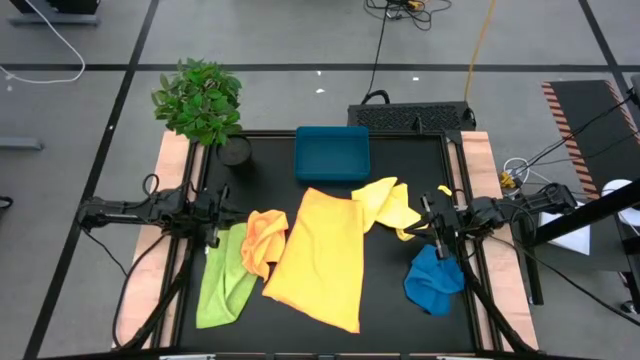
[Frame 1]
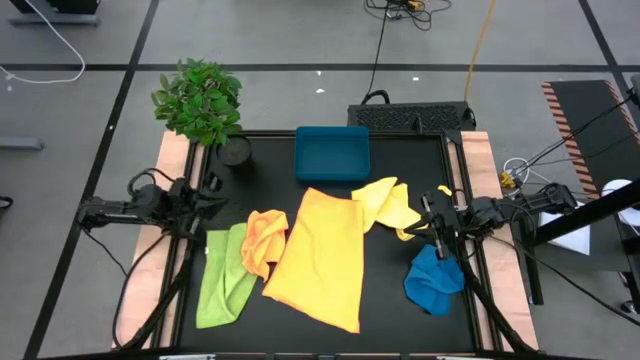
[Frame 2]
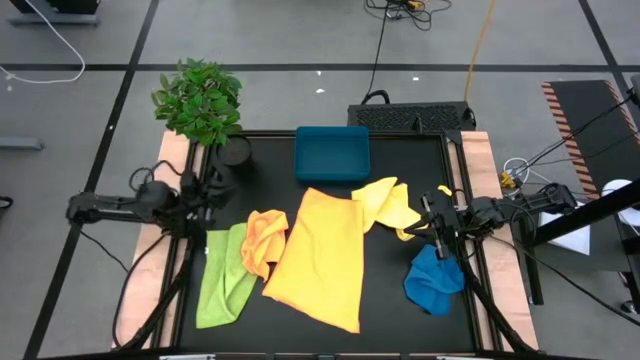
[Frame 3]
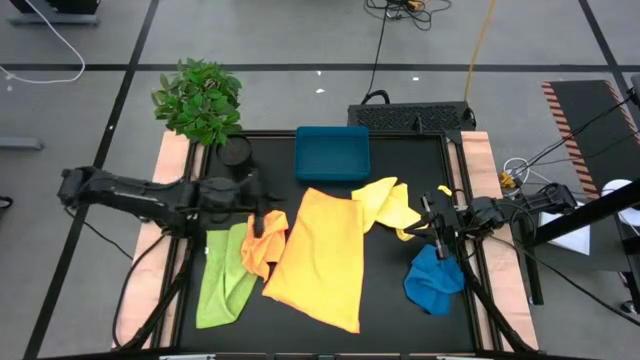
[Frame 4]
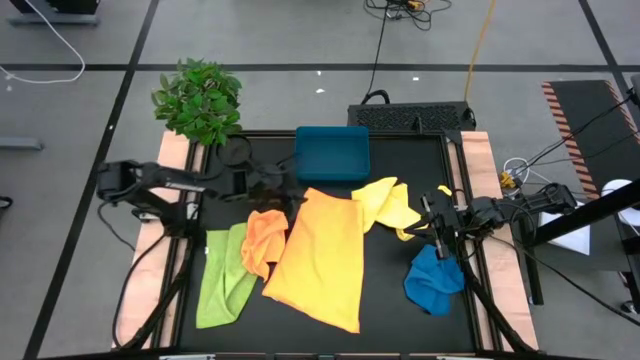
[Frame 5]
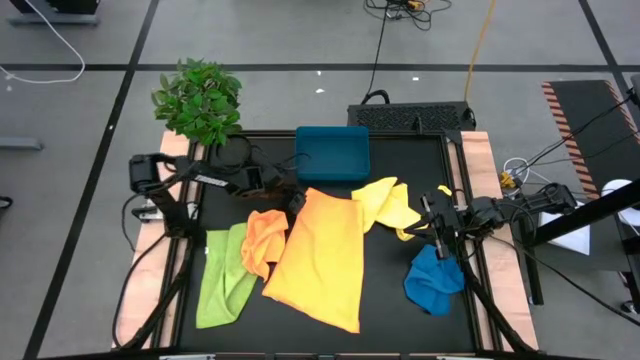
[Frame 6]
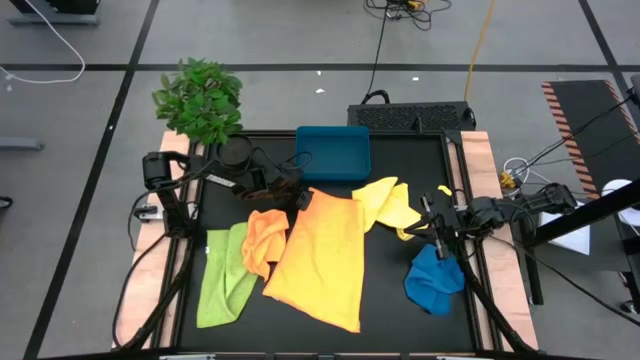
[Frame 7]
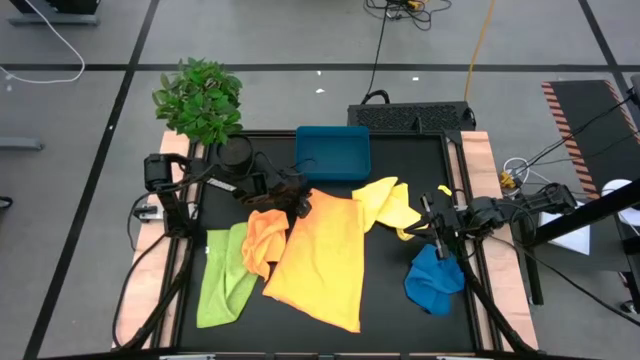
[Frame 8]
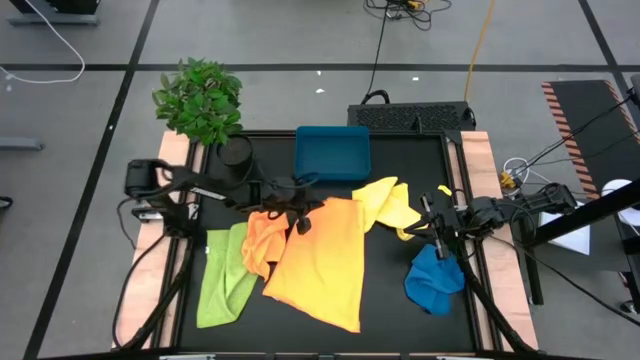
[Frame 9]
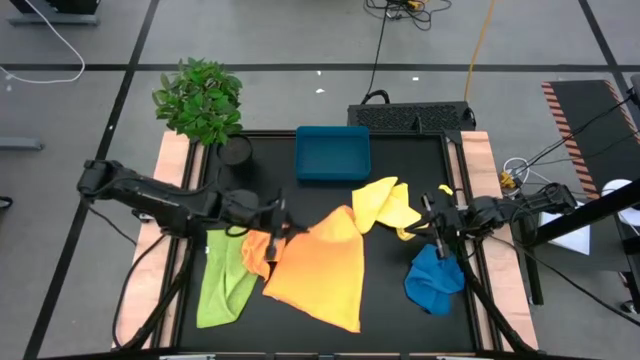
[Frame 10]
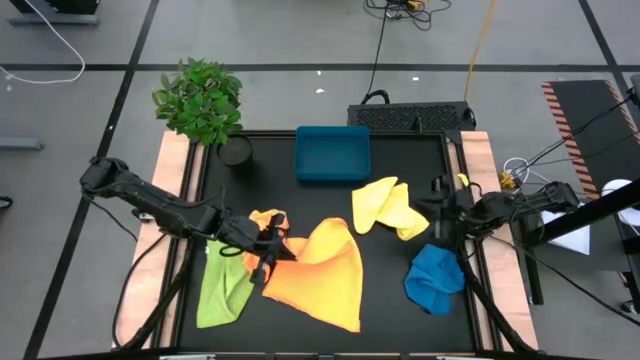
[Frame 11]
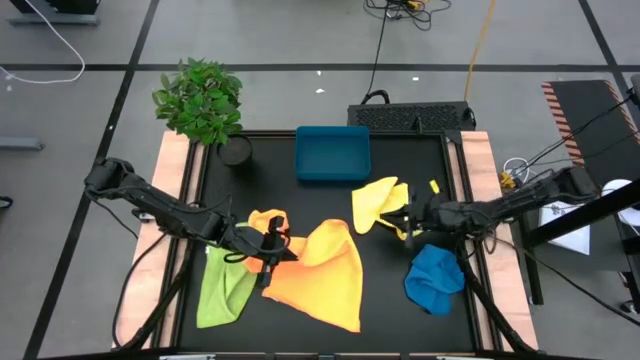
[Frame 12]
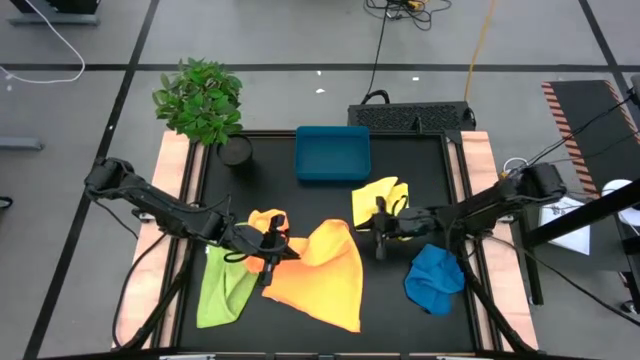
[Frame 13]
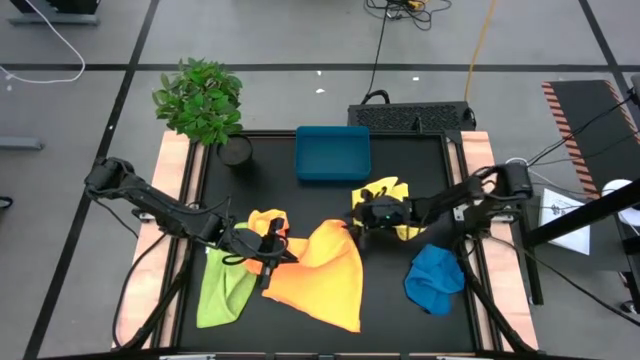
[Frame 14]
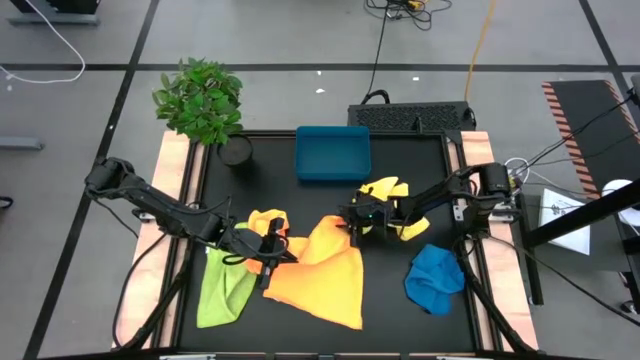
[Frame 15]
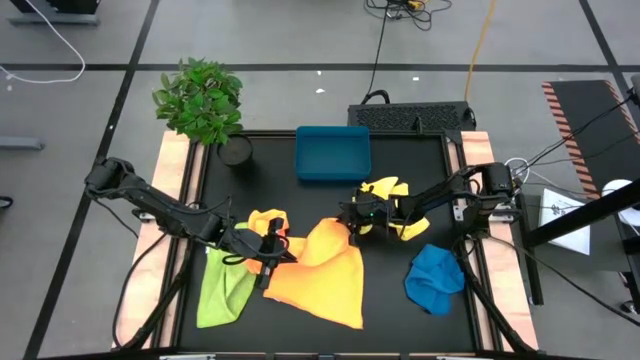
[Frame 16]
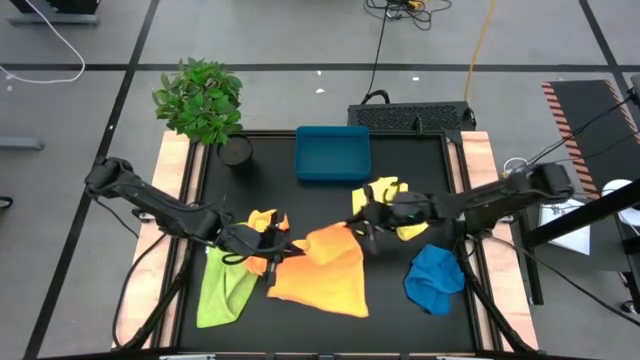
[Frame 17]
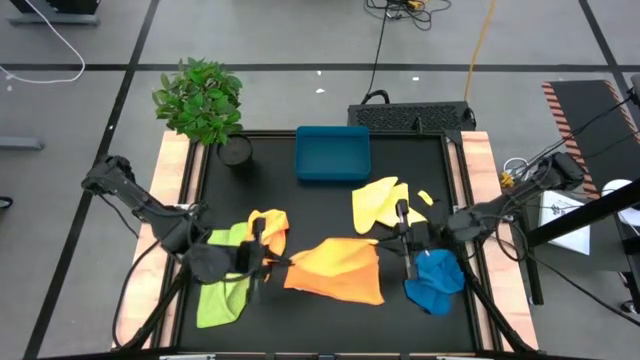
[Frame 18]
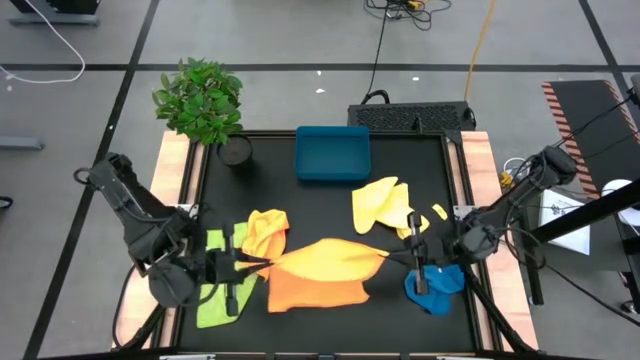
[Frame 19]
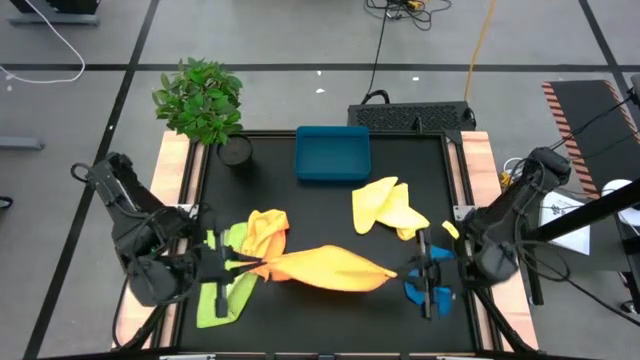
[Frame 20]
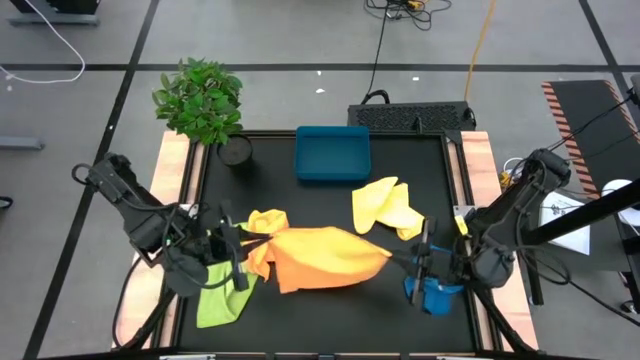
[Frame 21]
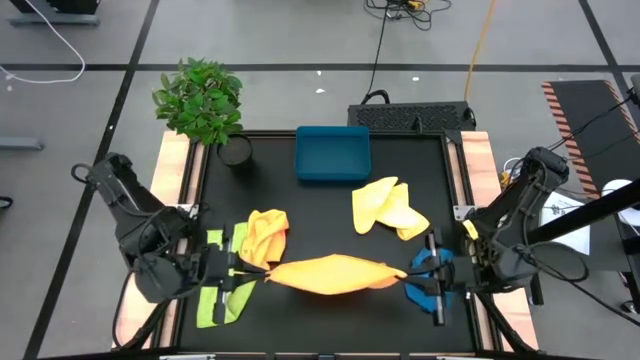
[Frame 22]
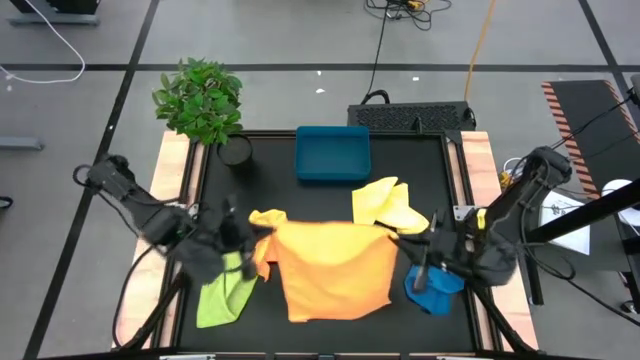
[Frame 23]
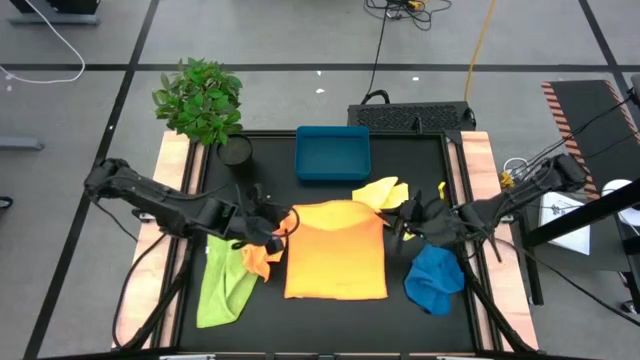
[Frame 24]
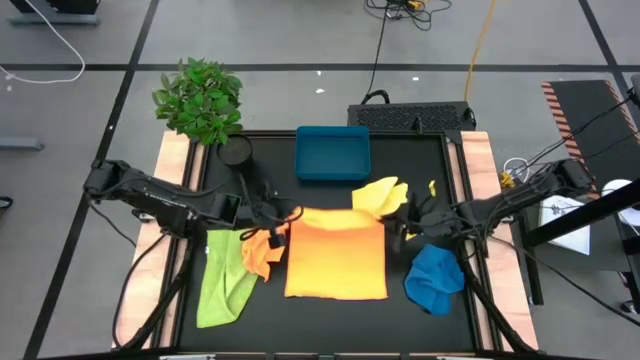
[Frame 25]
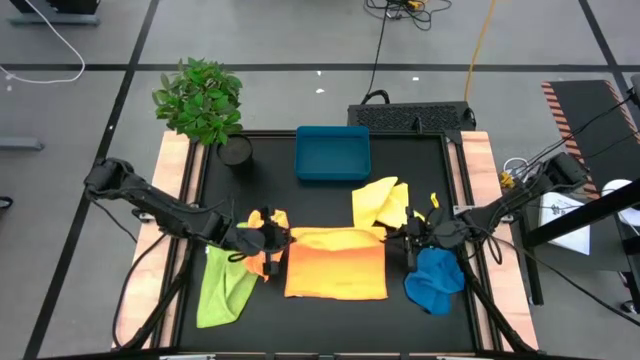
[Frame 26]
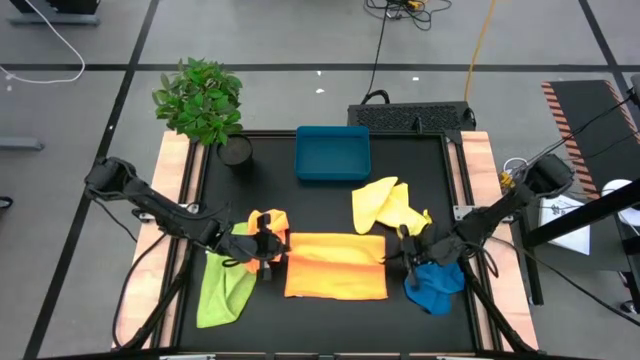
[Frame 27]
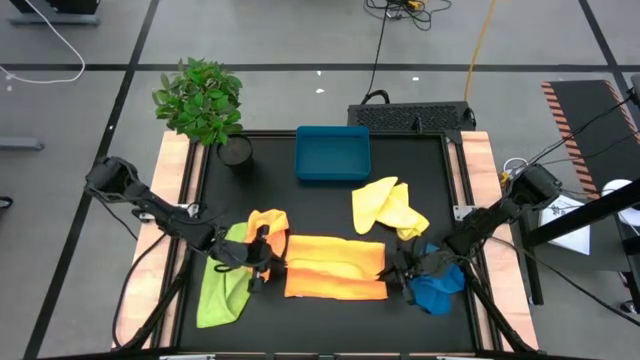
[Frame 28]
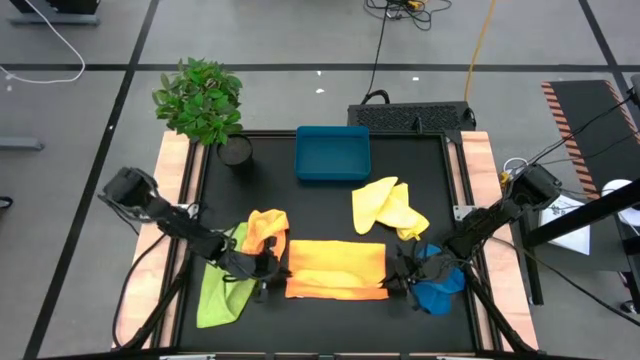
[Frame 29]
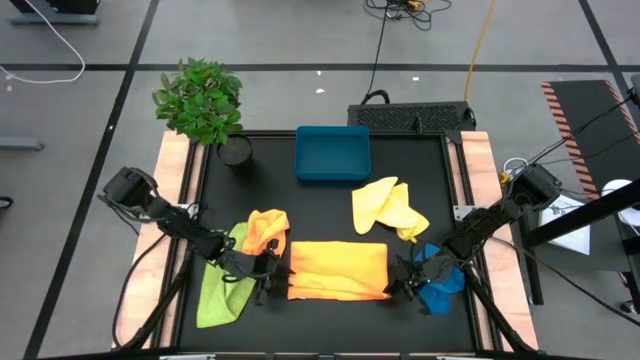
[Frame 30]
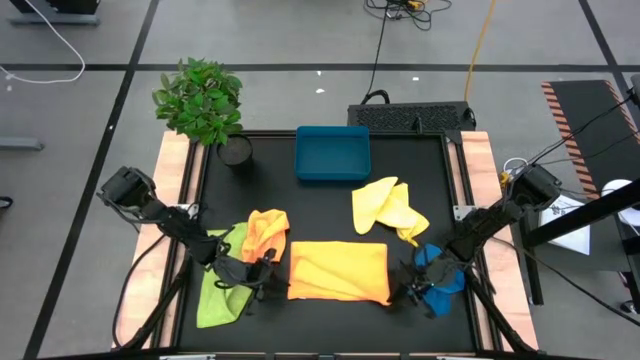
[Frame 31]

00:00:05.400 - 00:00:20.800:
Task: Fold microfiber towels
Fold the right orange microfiber towel

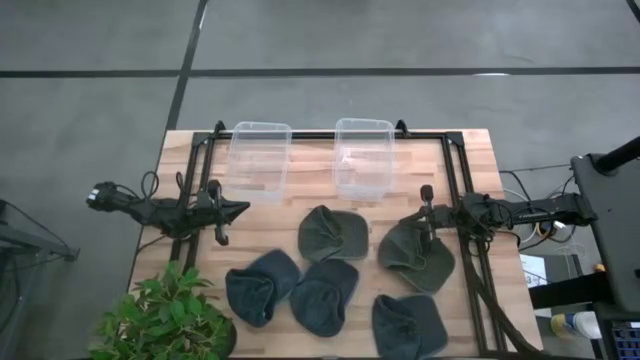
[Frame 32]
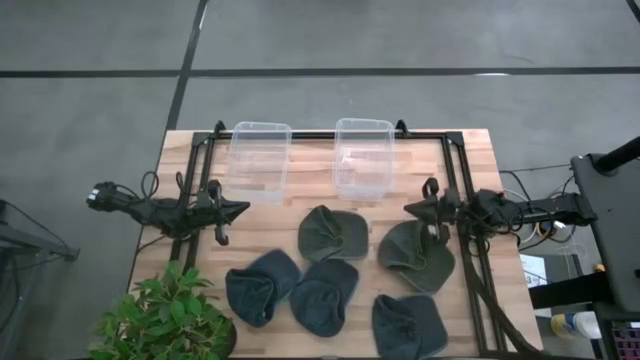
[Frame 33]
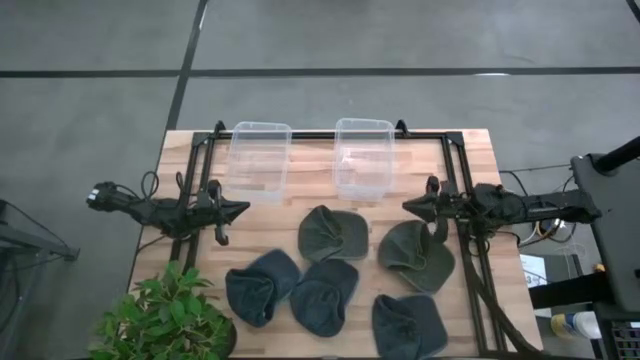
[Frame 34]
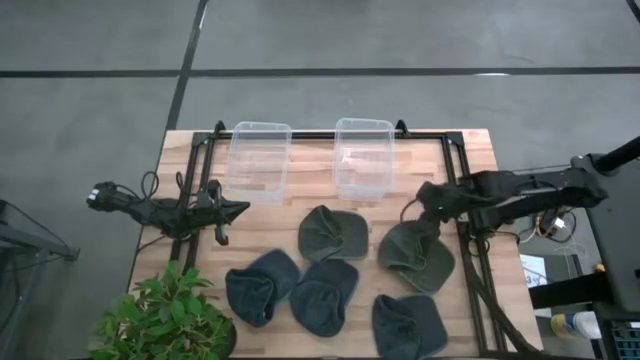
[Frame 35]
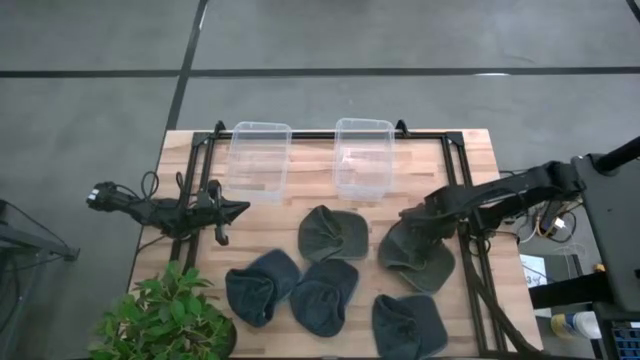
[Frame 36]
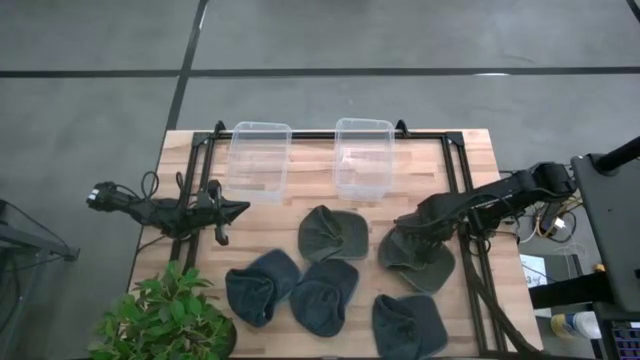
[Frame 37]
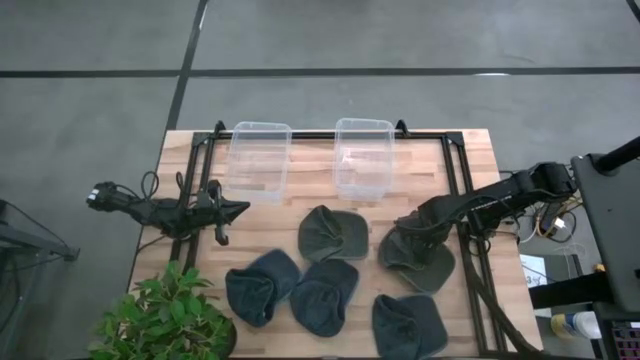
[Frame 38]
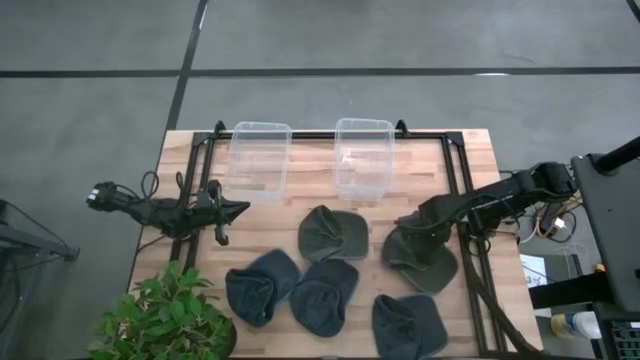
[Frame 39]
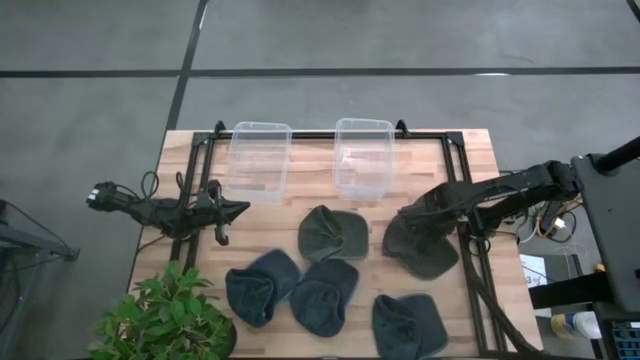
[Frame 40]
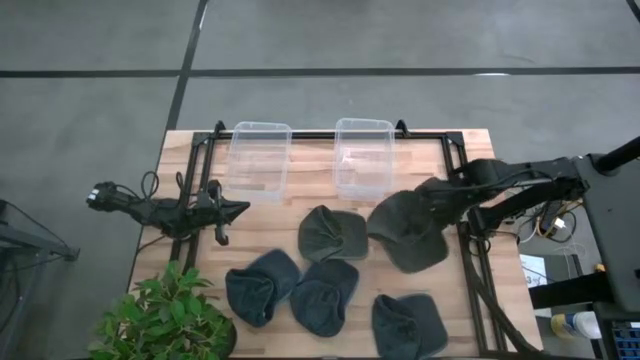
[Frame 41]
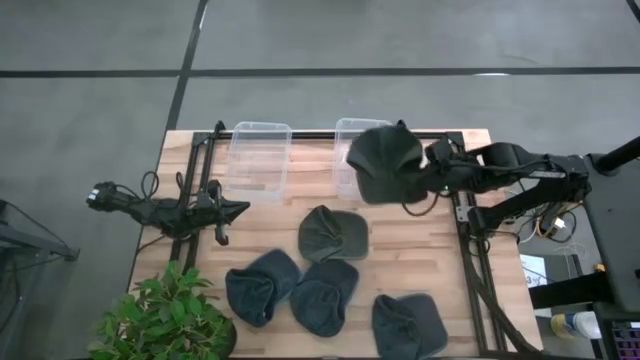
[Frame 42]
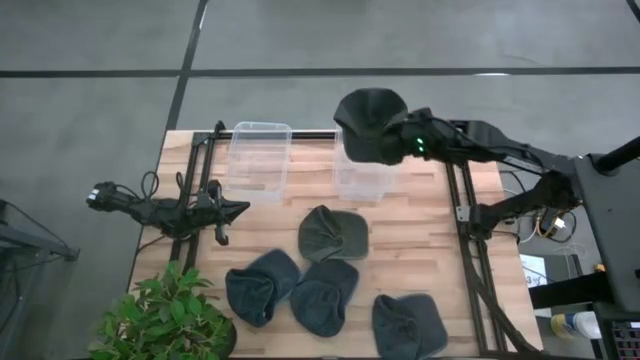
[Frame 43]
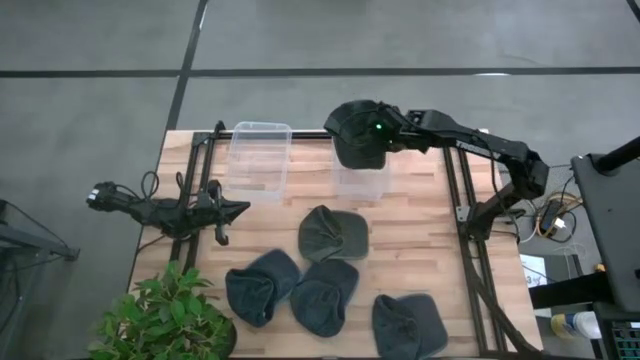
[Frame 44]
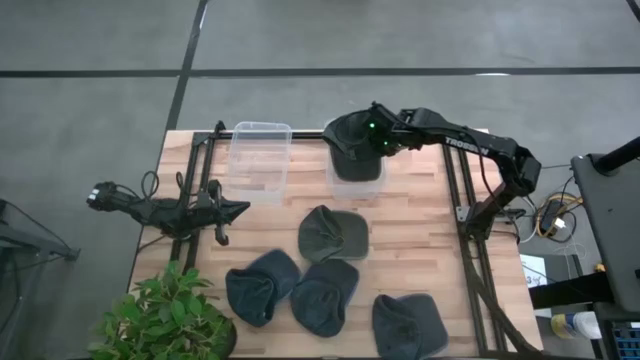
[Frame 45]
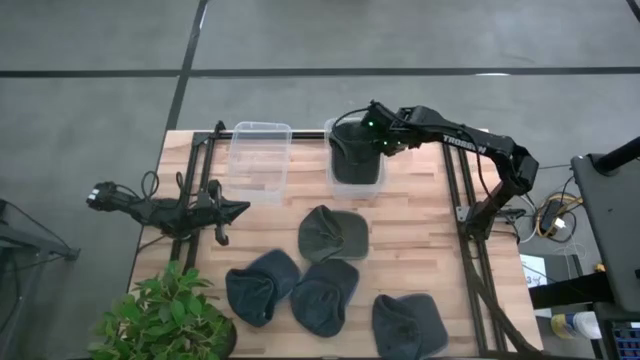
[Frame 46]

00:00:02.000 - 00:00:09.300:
Task: Pick & Place hat
Put the right gray cap into the right transparent bin
